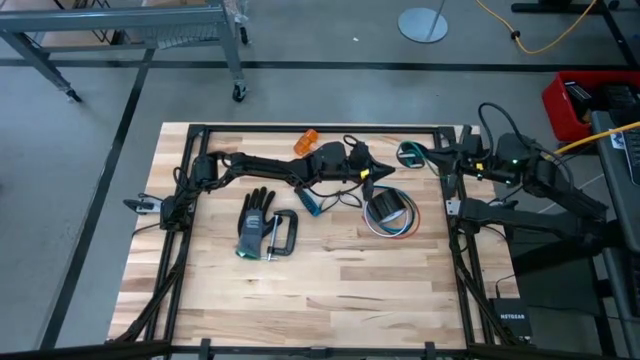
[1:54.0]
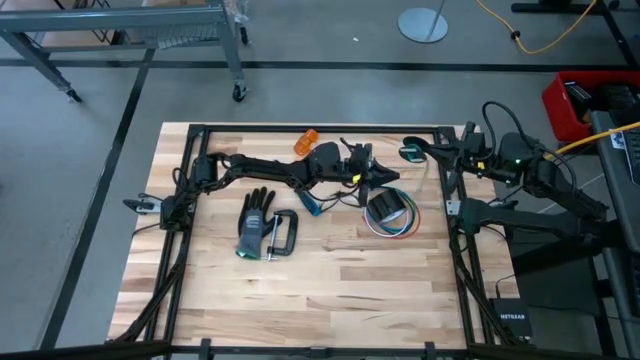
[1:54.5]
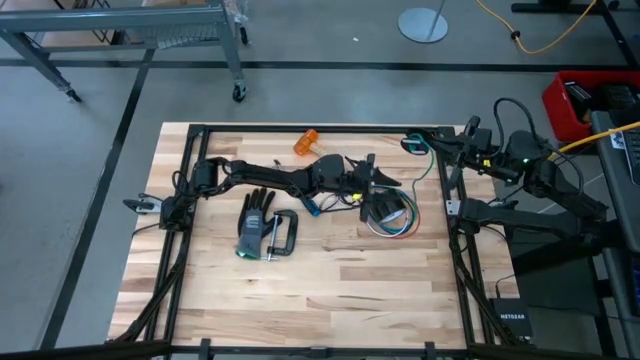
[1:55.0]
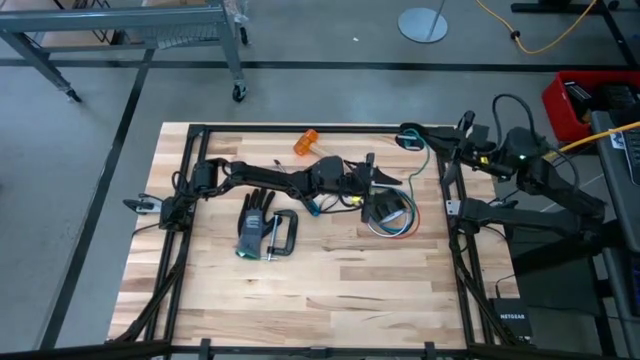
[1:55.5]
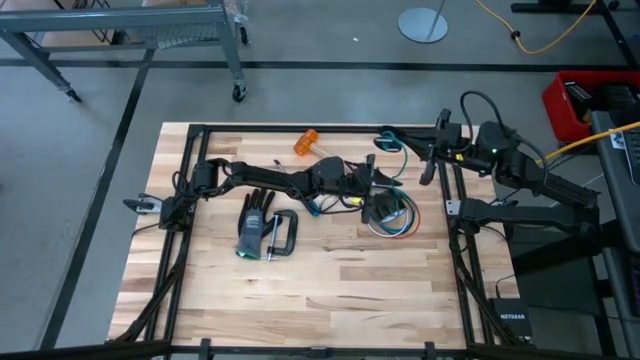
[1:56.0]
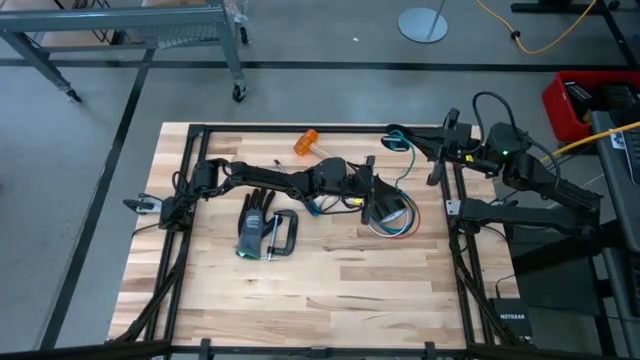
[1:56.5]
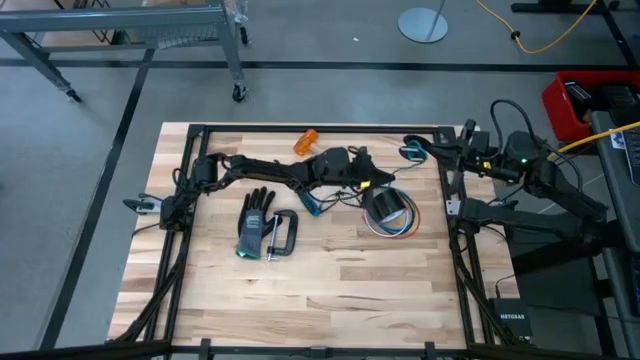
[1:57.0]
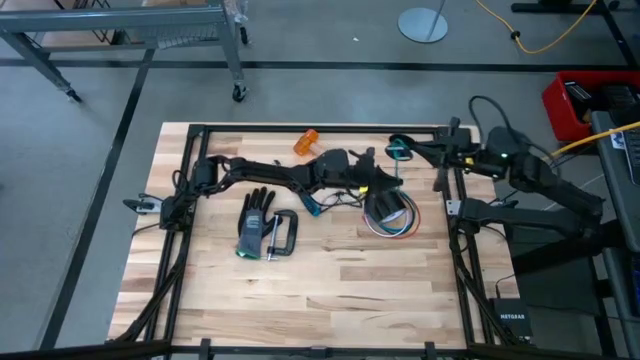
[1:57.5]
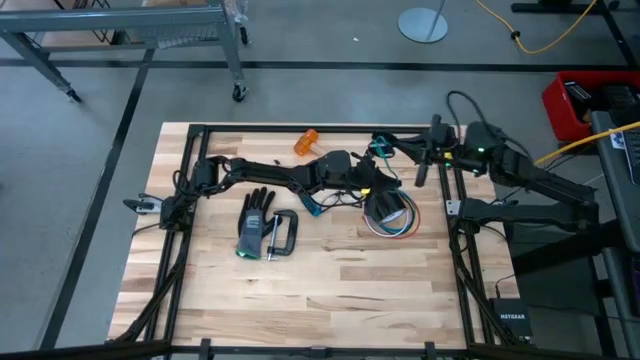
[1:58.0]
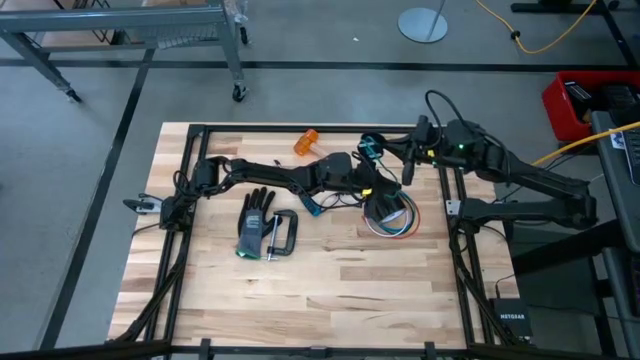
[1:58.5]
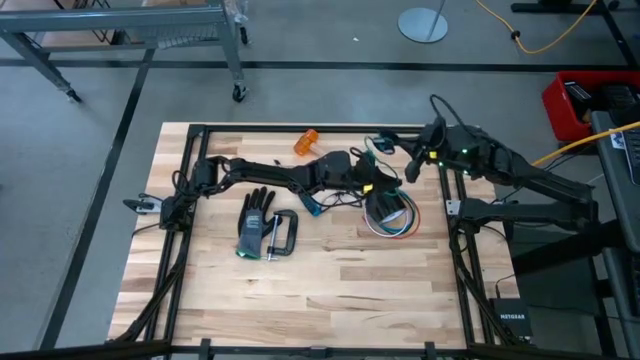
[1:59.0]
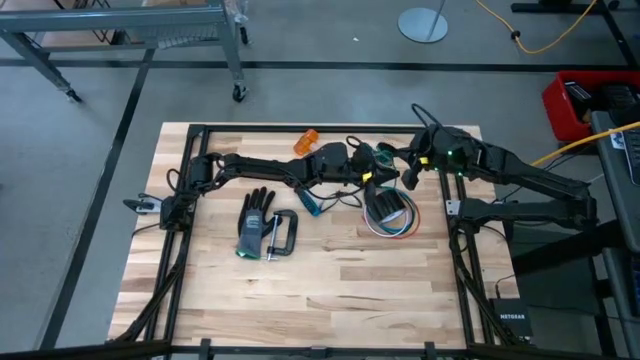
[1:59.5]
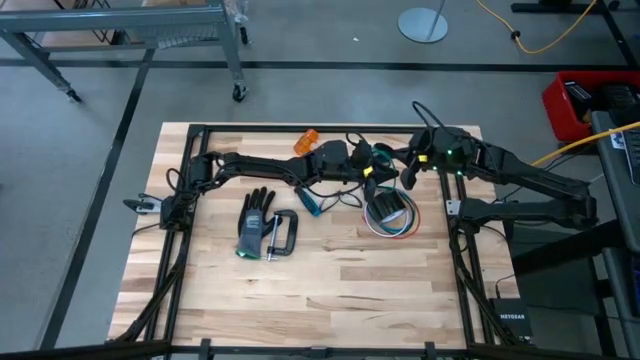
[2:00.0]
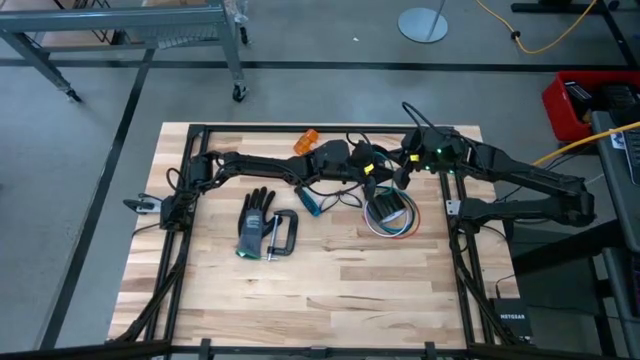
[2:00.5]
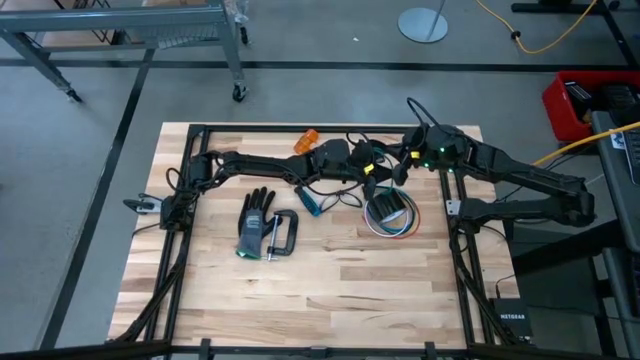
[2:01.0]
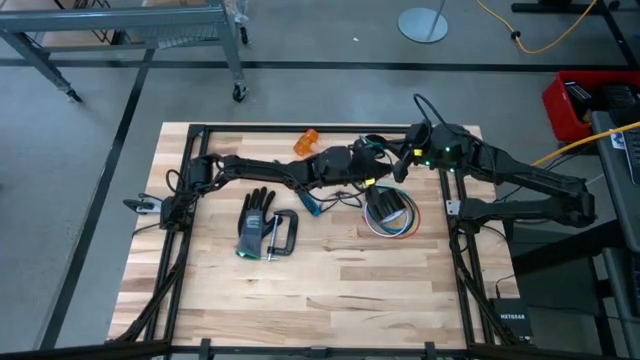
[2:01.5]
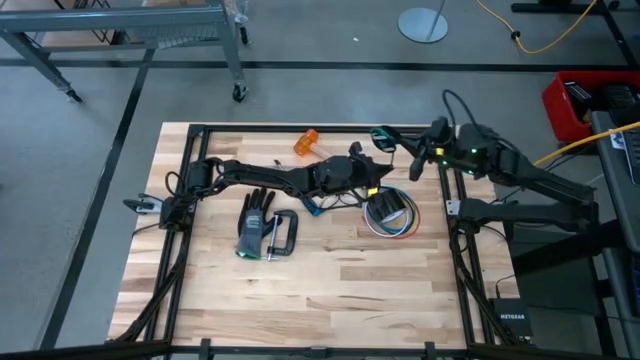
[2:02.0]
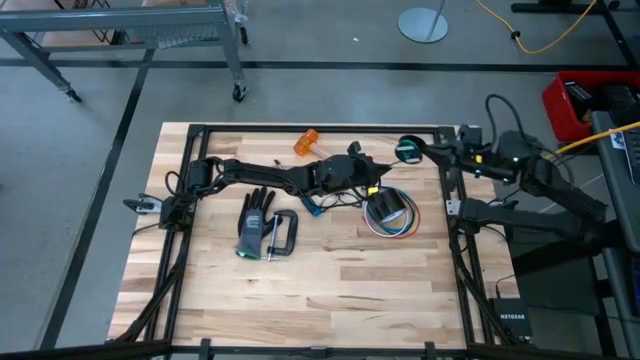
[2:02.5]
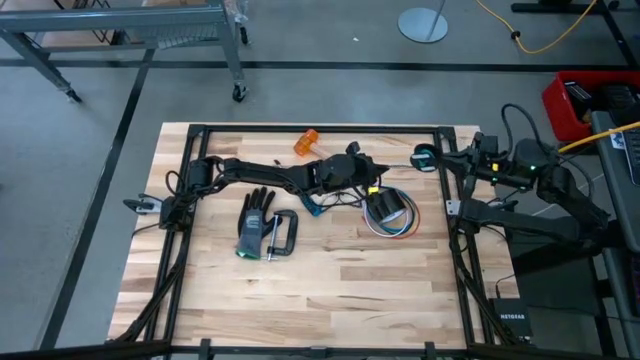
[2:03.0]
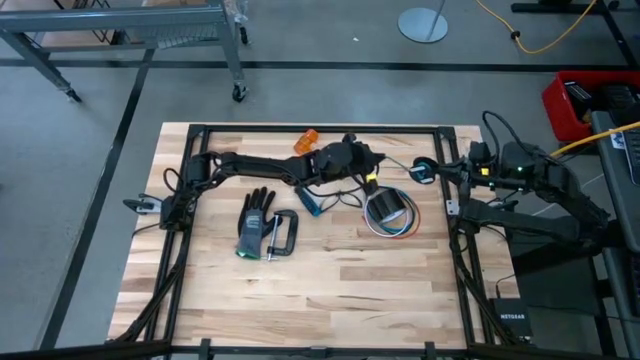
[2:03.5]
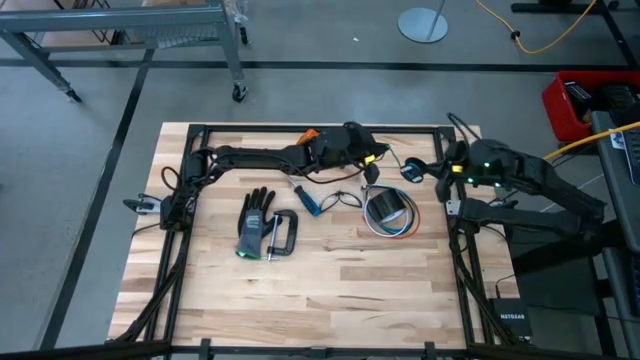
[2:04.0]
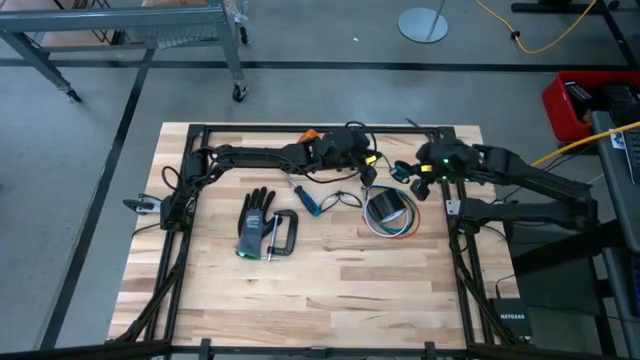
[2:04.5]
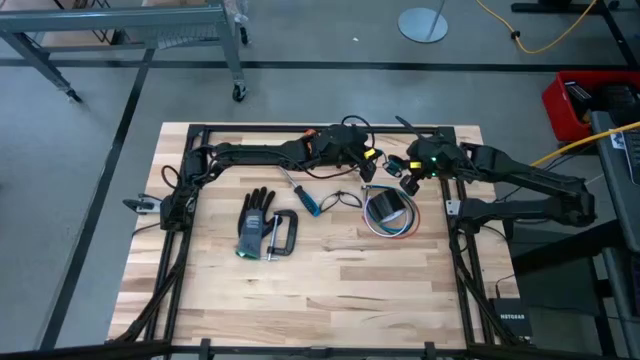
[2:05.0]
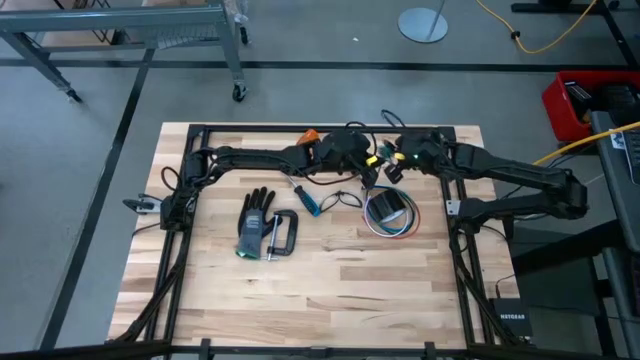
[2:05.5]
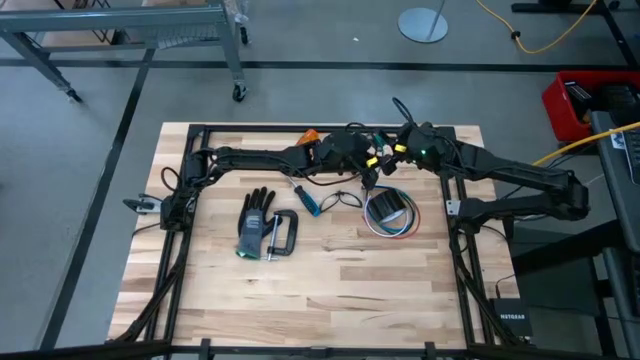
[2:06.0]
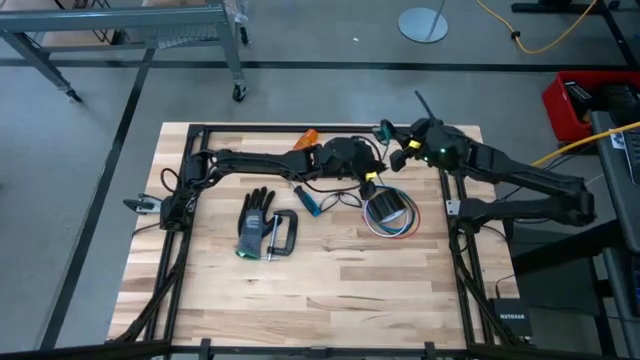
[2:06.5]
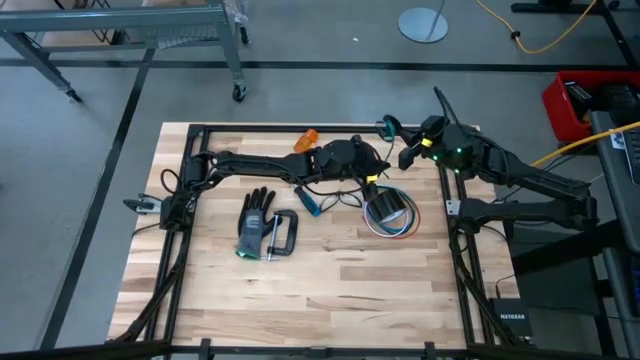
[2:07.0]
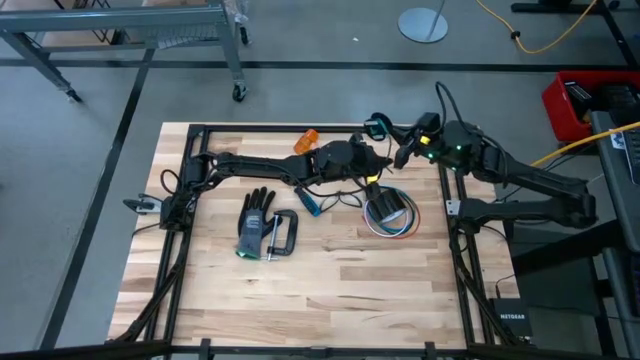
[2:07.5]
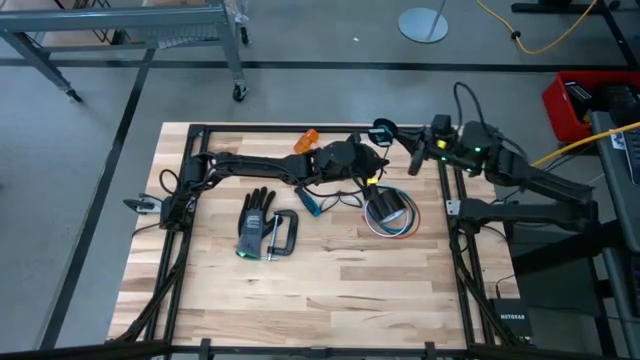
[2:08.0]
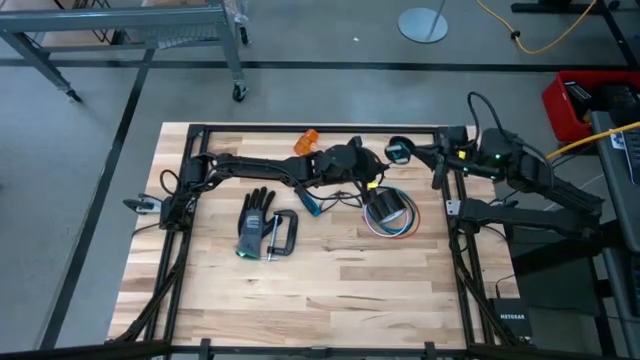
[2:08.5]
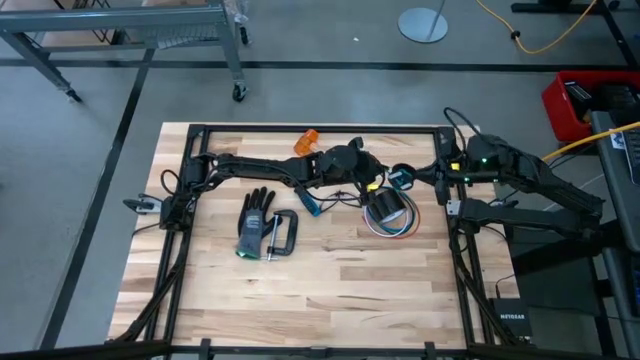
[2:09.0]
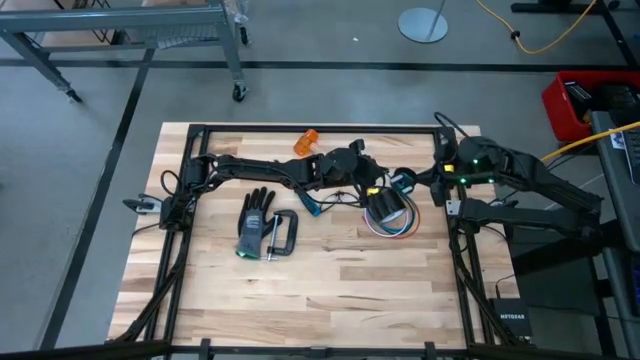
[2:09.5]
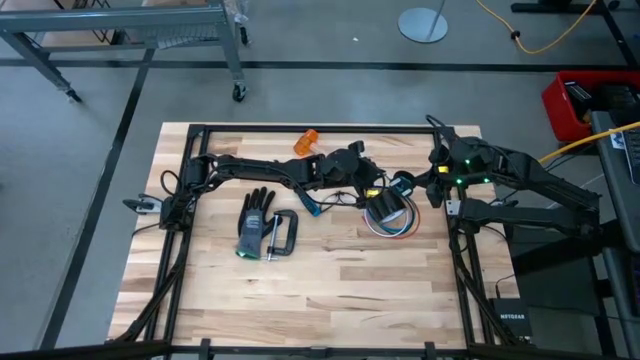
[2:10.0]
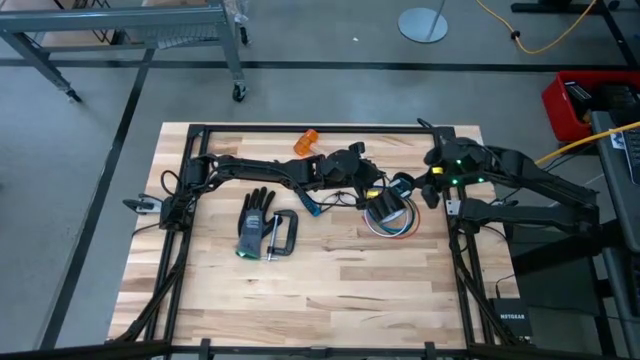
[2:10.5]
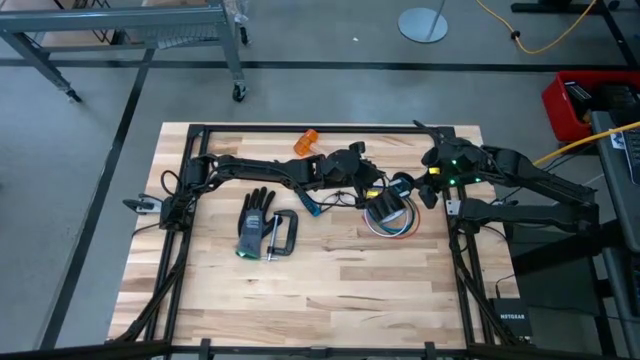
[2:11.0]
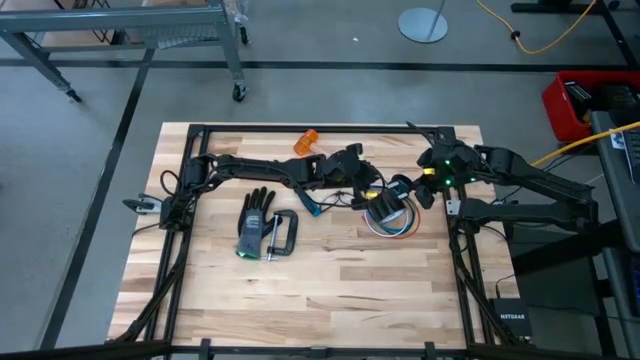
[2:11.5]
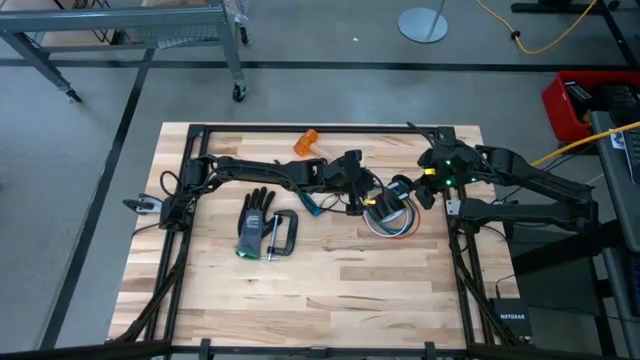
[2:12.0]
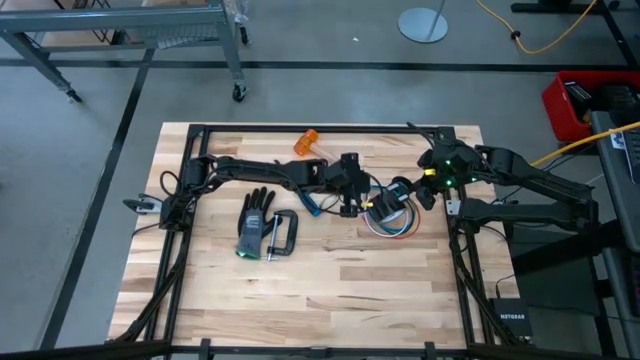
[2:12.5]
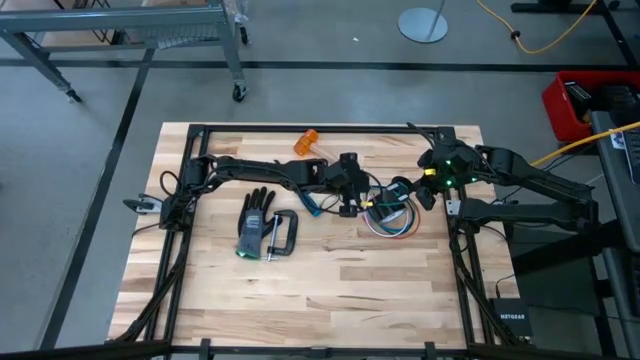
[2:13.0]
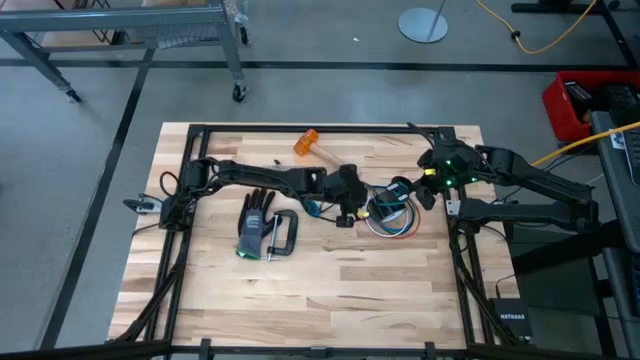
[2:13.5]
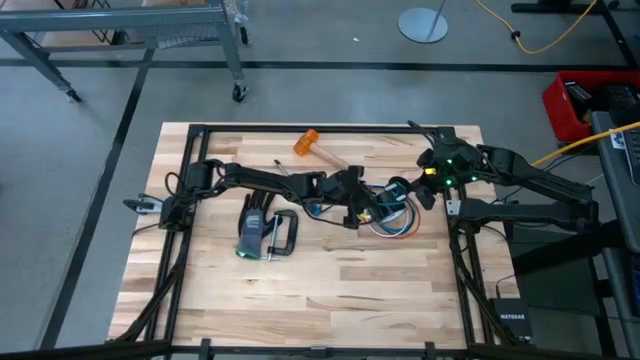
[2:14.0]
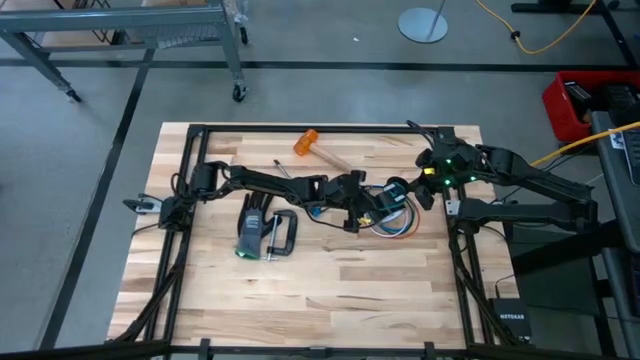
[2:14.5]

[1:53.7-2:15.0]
Task: Coil cords
Coil the green wire onto the spool
